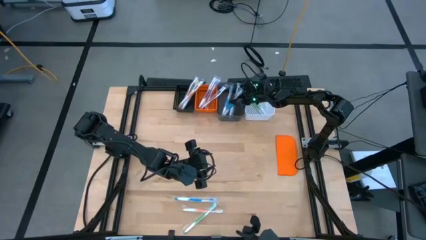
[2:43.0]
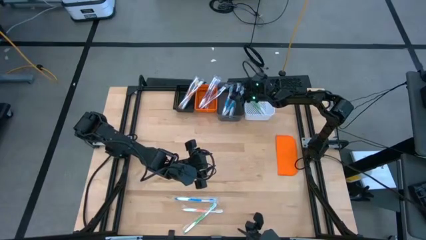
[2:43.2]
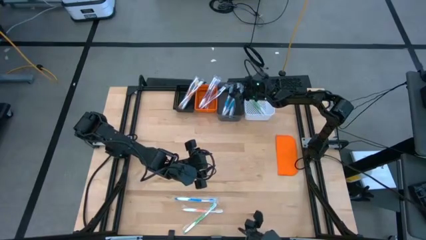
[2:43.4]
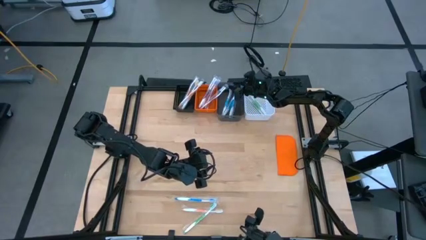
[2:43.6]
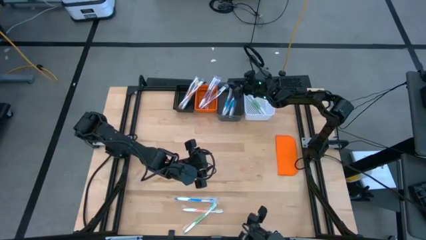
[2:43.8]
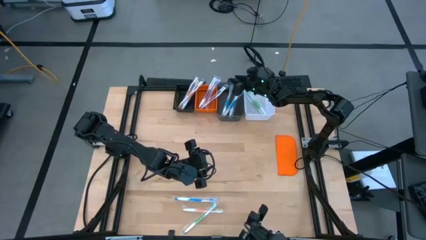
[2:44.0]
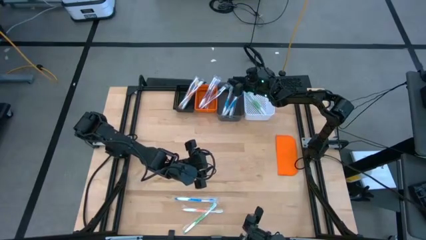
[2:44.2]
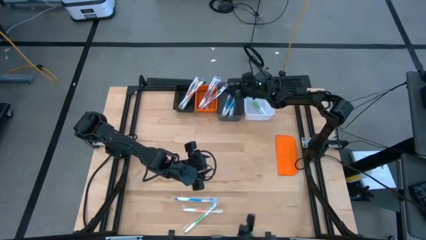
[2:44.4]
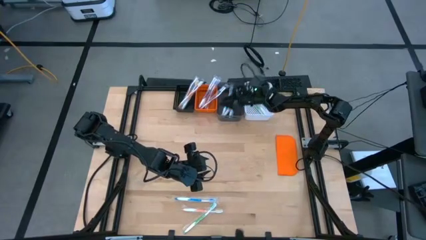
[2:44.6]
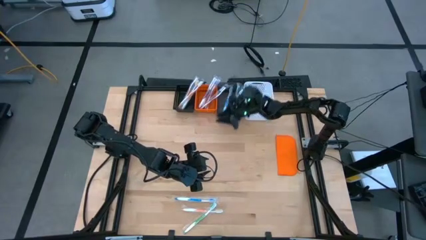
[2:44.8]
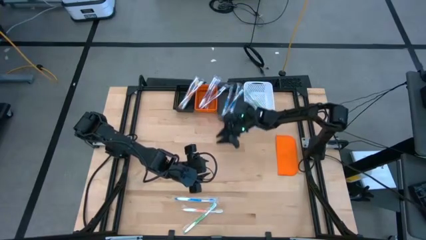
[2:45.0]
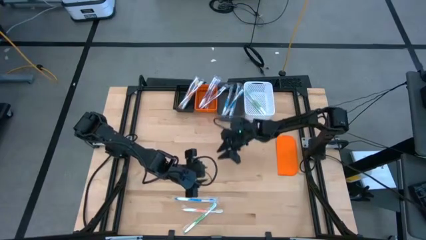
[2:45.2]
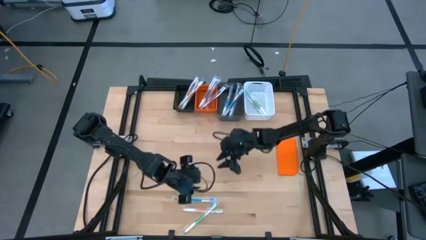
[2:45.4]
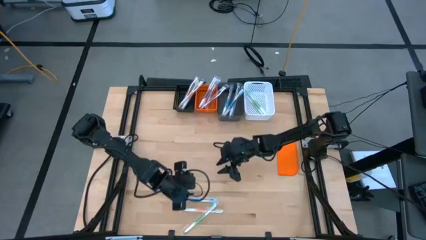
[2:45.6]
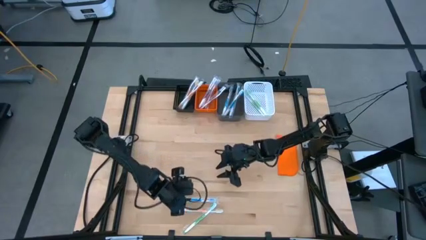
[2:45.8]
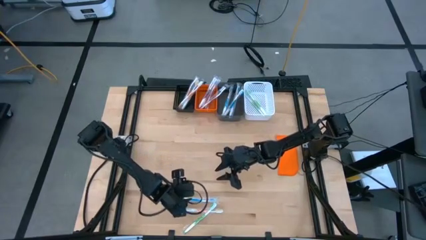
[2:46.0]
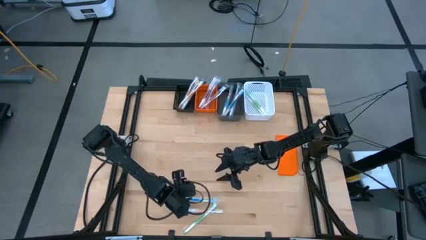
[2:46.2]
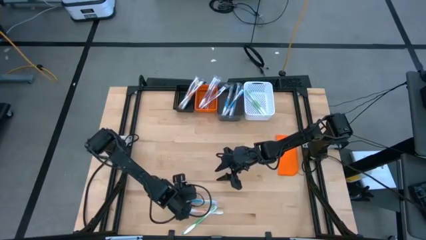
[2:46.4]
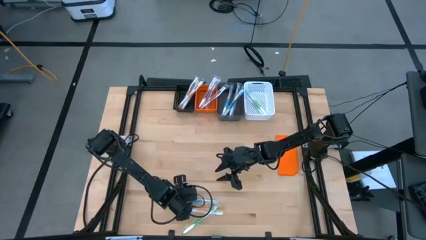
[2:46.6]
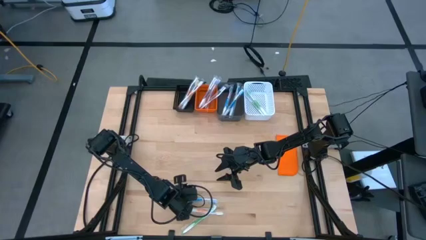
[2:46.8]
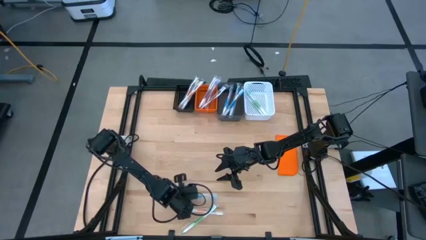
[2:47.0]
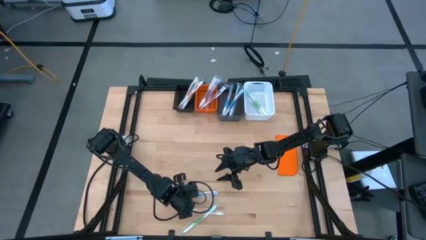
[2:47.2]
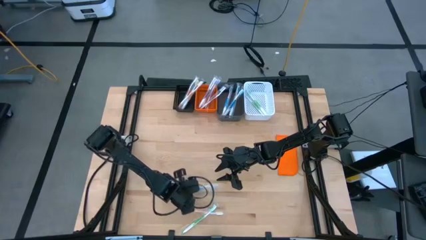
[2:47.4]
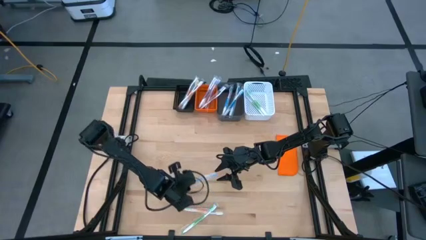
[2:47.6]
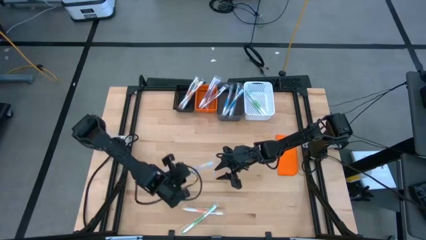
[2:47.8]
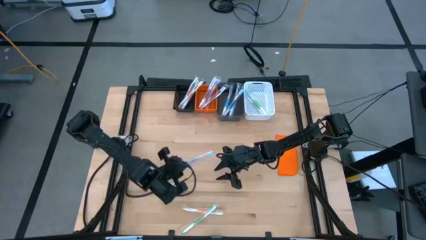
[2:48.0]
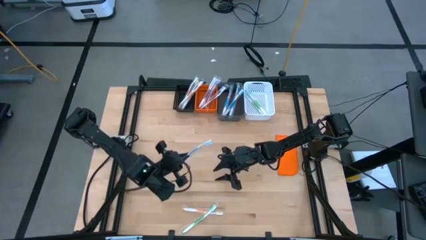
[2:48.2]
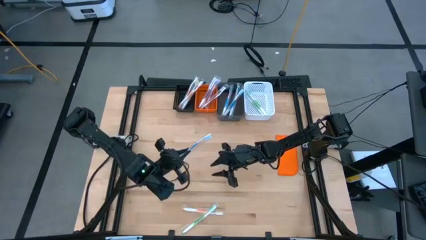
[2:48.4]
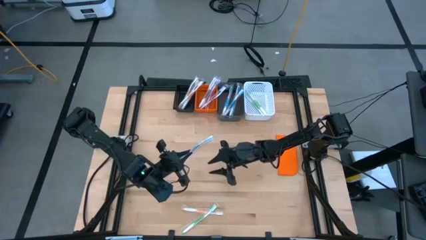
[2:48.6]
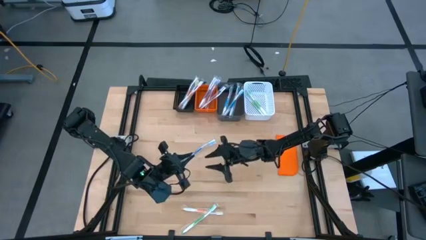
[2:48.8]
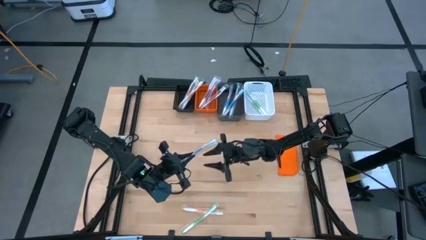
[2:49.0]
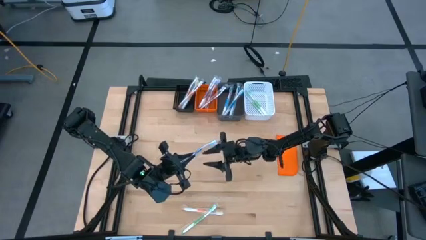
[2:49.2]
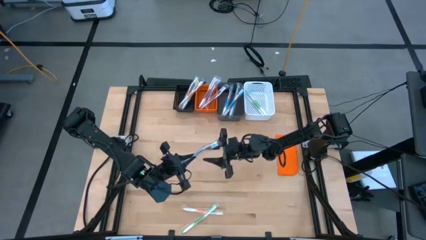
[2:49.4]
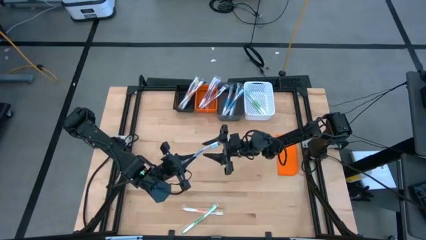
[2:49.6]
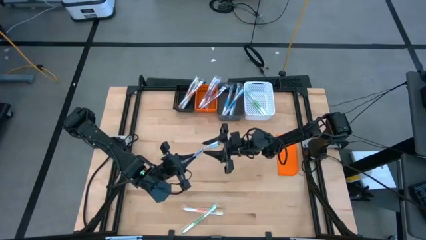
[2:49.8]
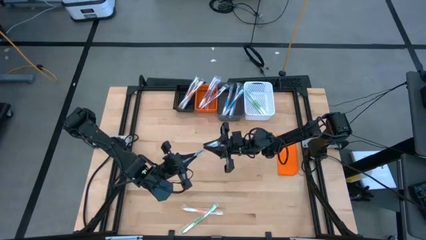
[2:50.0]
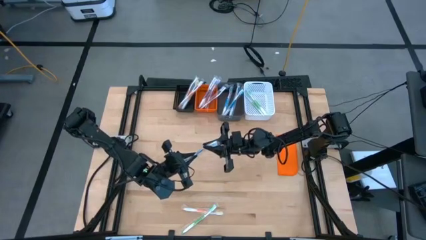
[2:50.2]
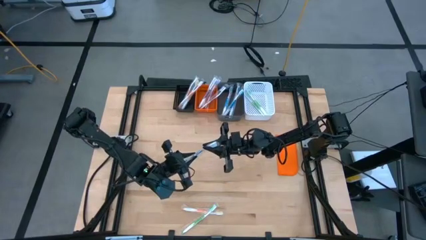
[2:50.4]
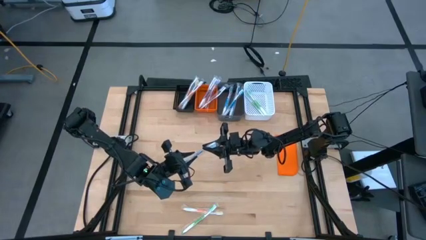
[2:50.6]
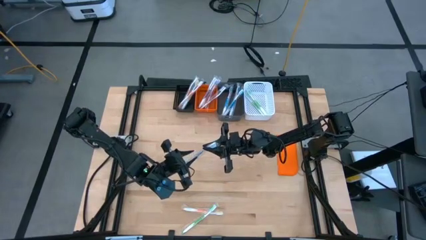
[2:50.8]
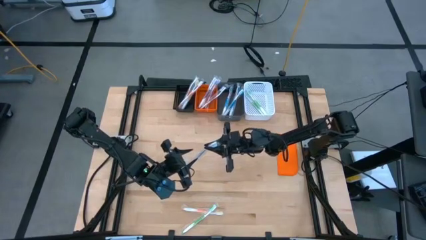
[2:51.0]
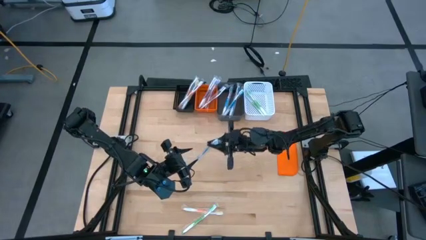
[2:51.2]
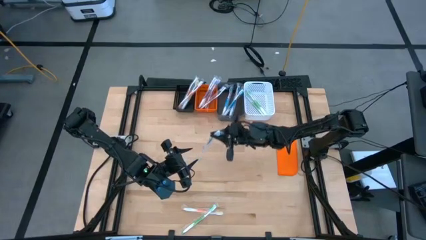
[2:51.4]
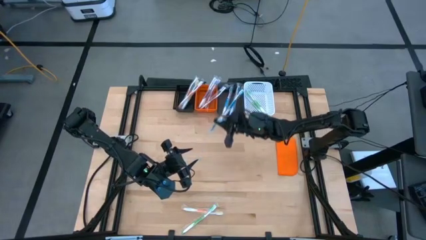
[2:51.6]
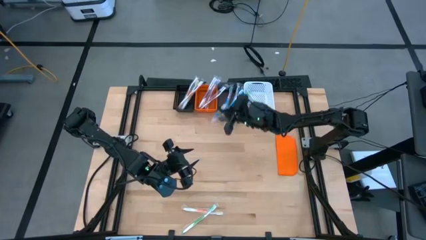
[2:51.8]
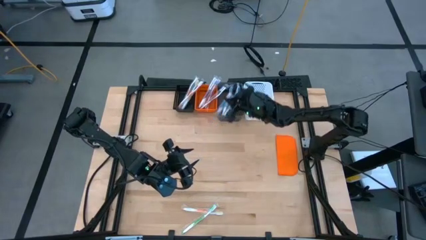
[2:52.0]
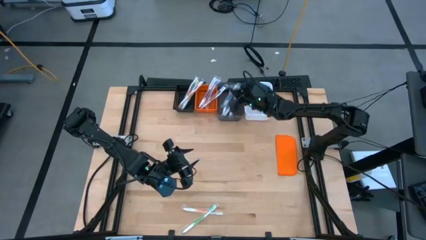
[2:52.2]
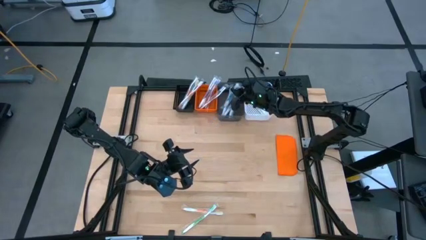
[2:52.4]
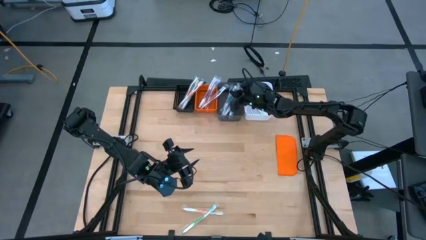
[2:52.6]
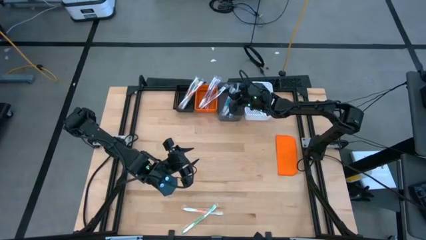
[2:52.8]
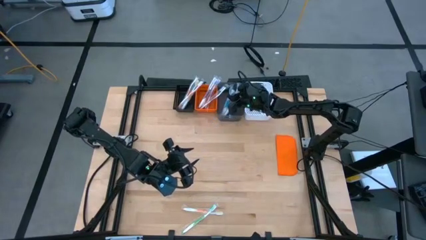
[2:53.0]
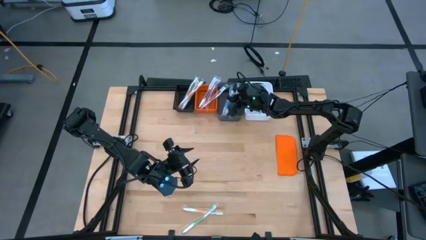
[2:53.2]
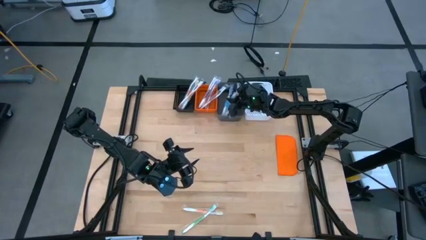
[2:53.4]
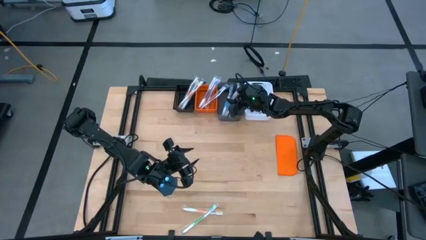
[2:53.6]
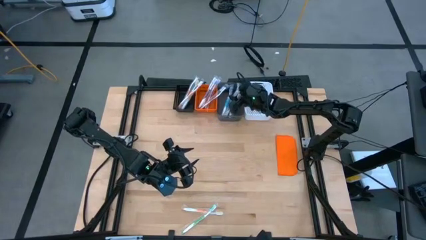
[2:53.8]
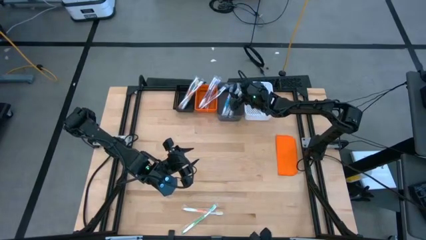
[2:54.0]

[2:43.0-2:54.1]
Task: Pick & Place Toothbrushes
Put the blue toothbrush into the gray bin

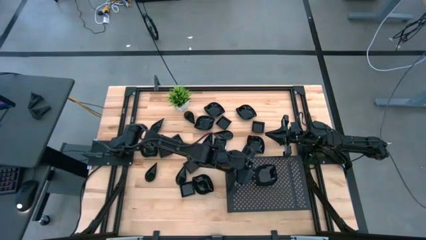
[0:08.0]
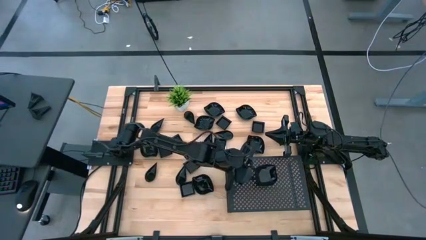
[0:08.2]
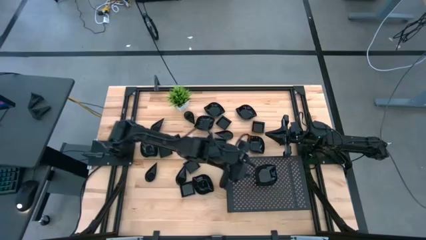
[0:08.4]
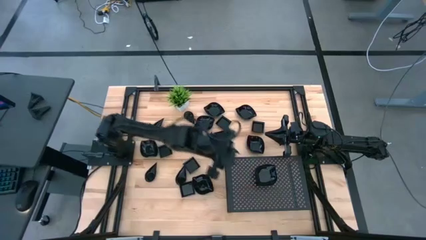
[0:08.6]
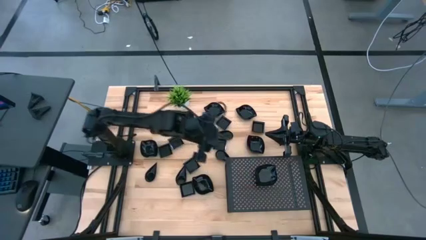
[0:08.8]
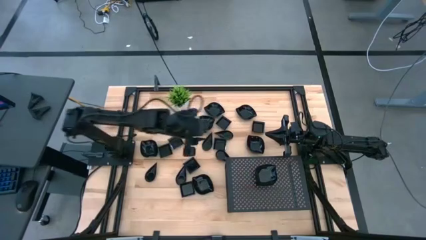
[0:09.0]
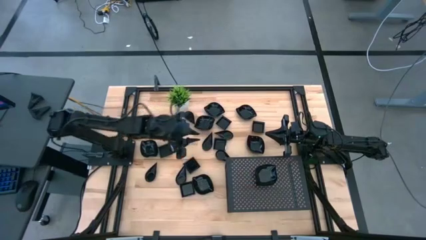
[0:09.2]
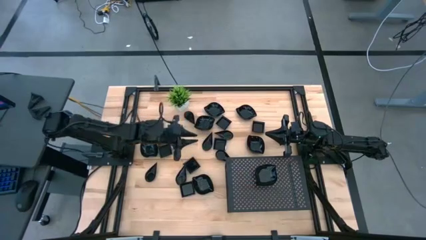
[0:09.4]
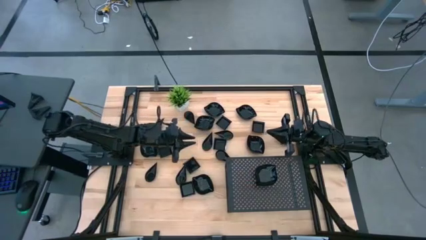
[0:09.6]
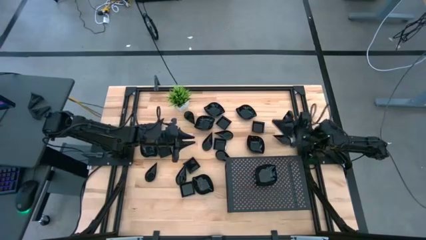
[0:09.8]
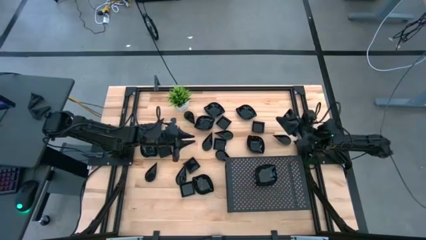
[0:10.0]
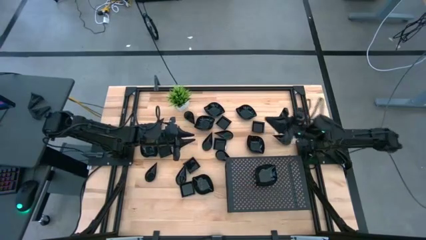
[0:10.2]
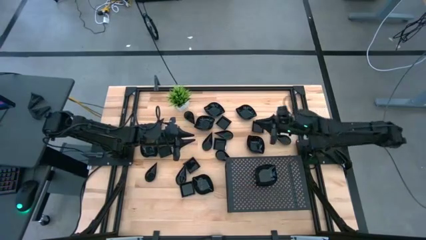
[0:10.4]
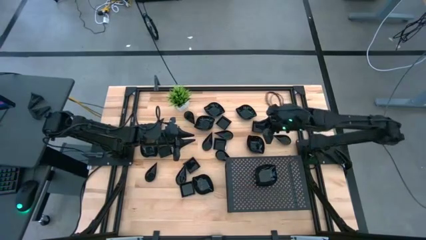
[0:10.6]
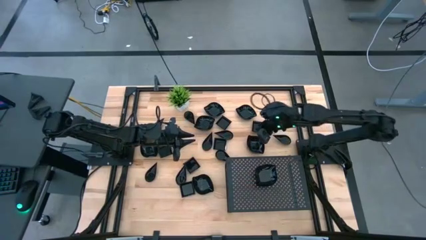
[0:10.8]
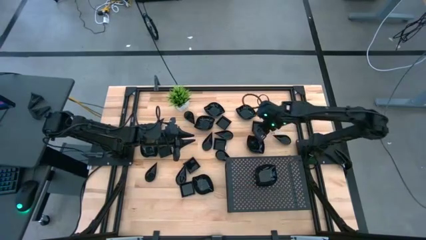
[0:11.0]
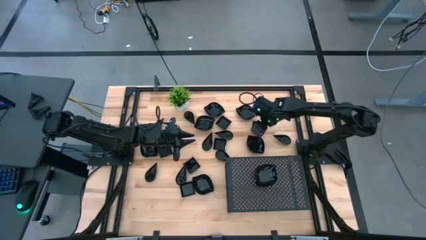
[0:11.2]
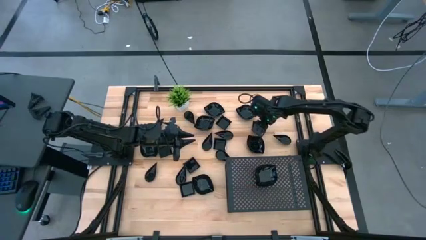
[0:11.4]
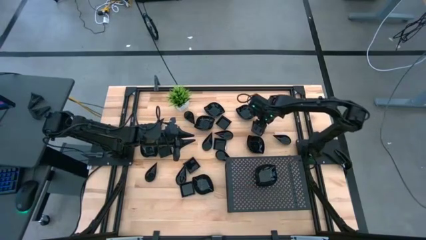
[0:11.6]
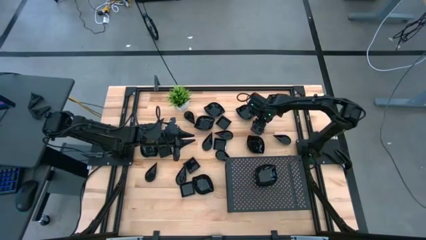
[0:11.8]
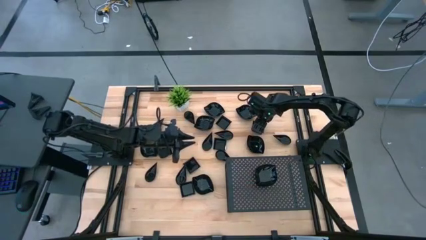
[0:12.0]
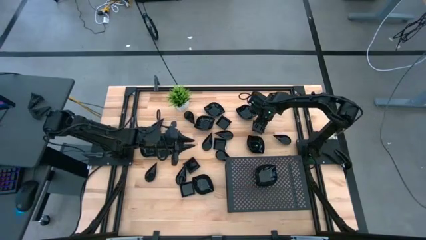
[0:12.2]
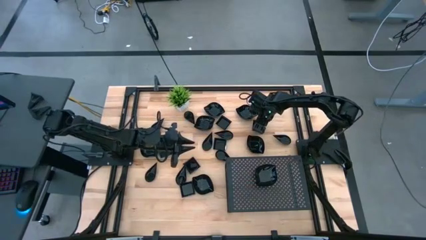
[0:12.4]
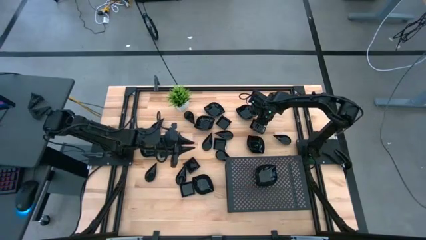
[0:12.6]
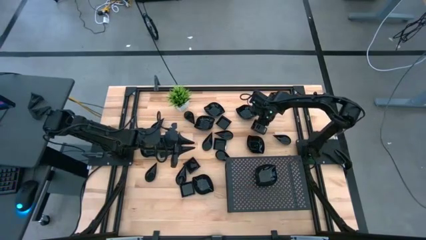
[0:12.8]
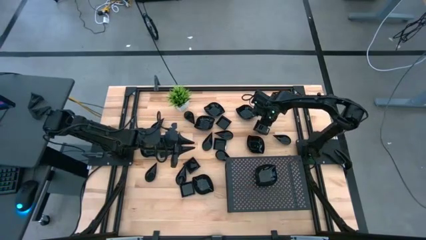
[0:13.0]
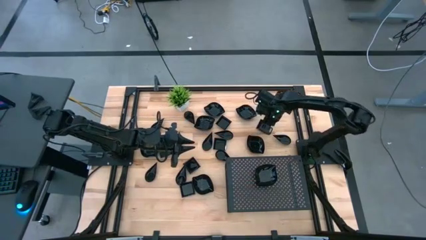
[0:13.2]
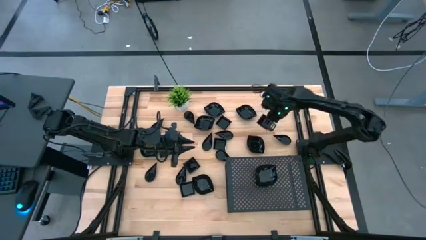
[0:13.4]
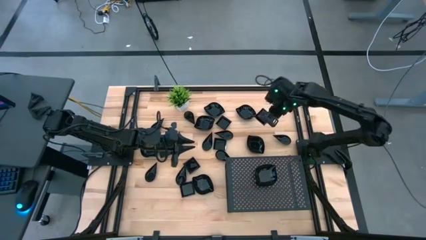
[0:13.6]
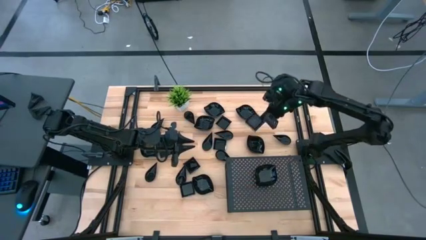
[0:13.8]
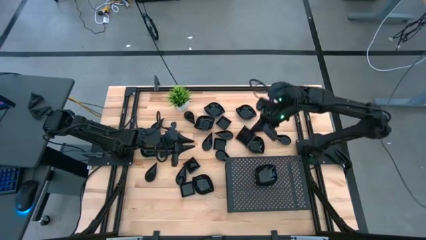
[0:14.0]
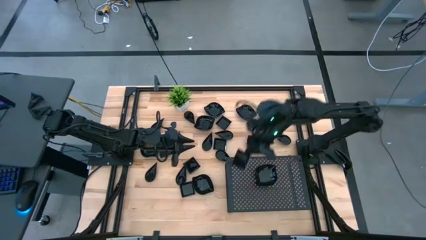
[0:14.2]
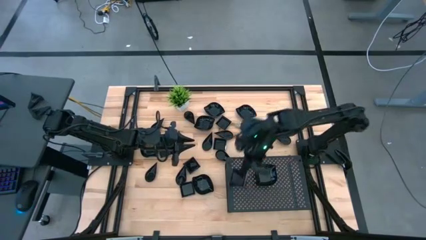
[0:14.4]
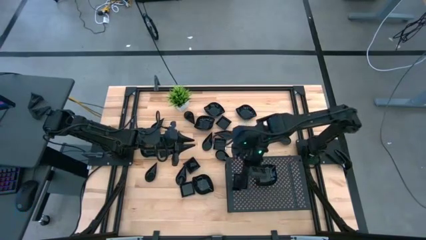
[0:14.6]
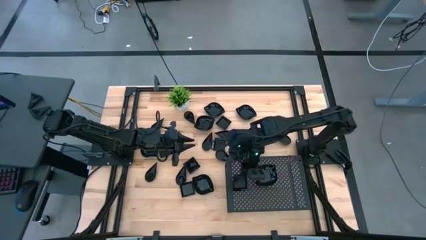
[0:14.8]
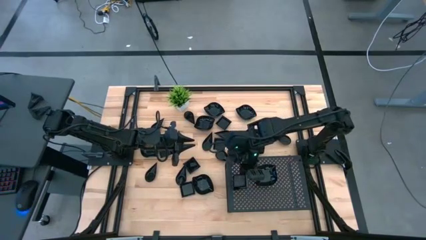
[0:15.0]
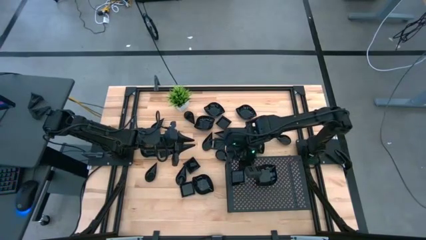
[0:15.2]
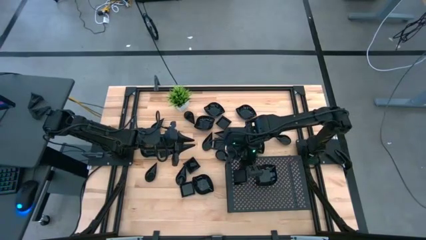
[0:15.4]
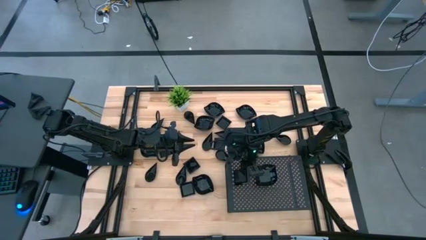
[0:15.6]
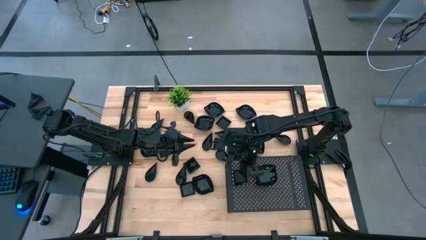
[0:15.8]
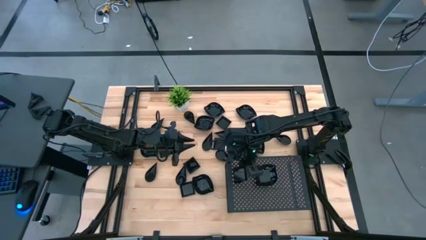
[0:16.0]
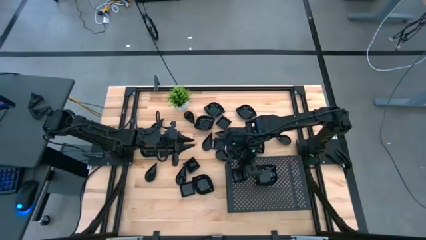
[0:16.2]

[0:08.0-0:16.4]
Task: Pick & Place Mini shaped plates
Put the square plate on the shelf
